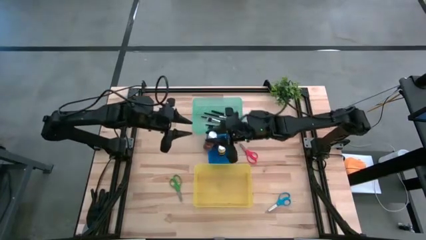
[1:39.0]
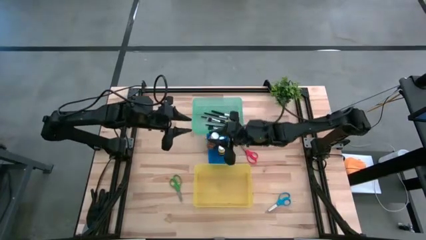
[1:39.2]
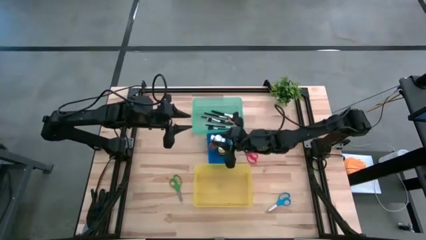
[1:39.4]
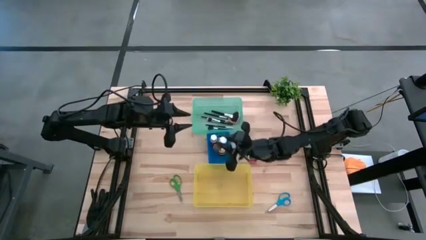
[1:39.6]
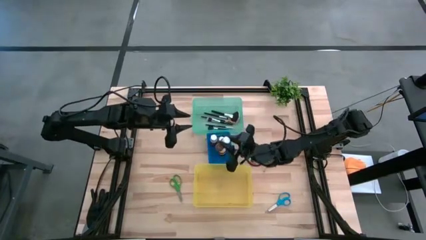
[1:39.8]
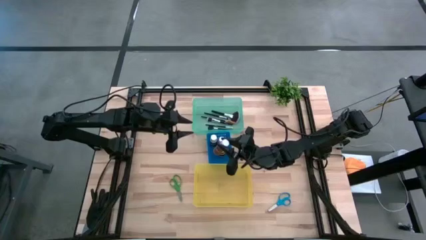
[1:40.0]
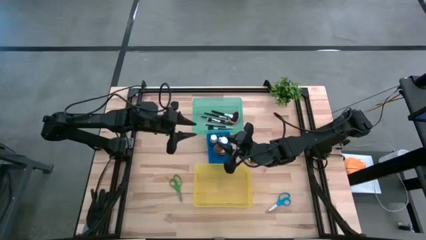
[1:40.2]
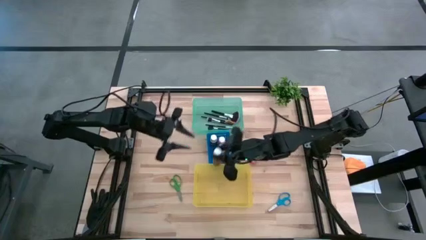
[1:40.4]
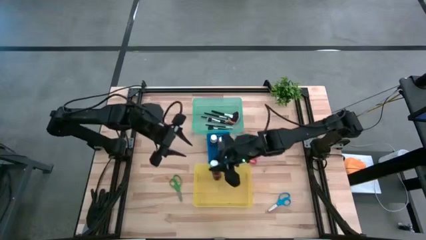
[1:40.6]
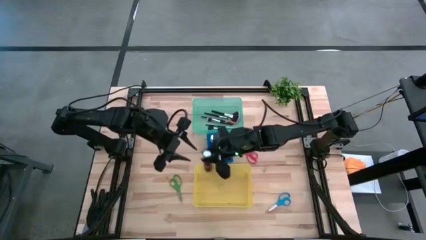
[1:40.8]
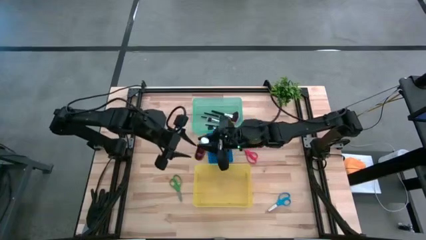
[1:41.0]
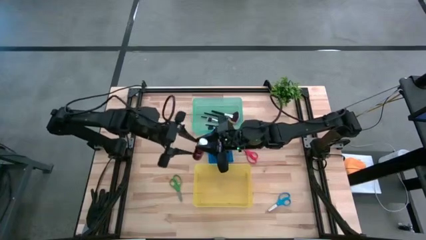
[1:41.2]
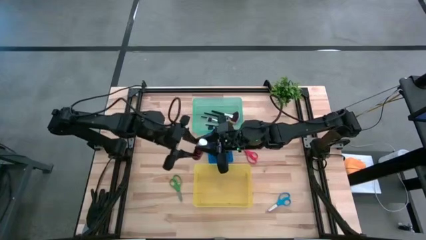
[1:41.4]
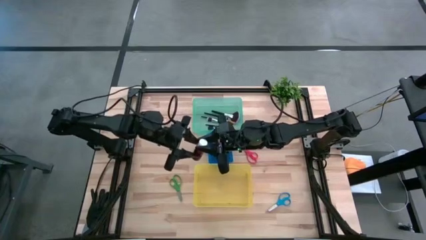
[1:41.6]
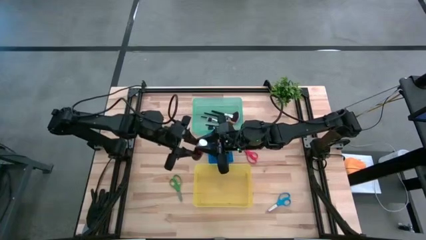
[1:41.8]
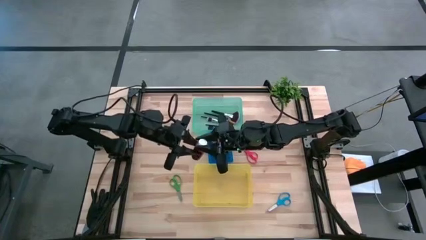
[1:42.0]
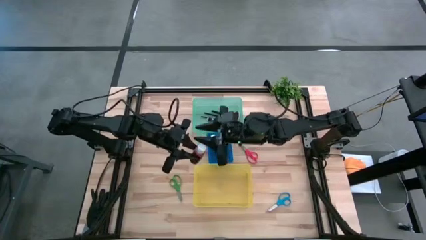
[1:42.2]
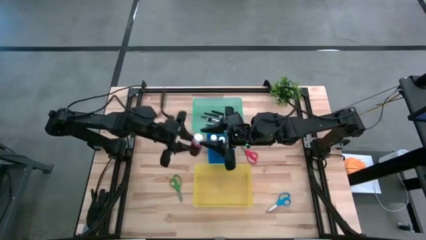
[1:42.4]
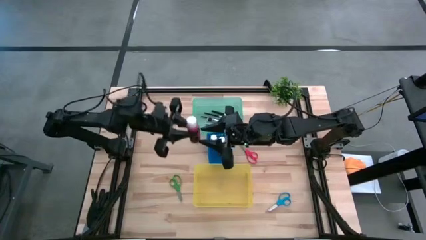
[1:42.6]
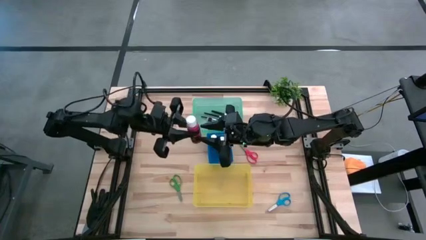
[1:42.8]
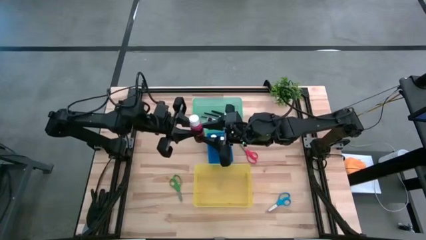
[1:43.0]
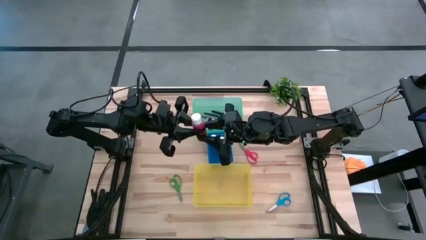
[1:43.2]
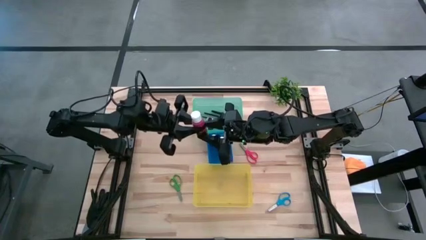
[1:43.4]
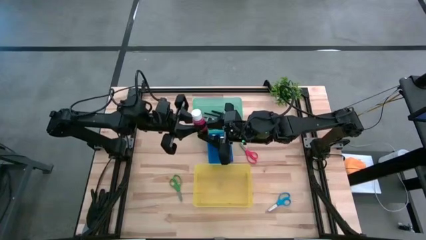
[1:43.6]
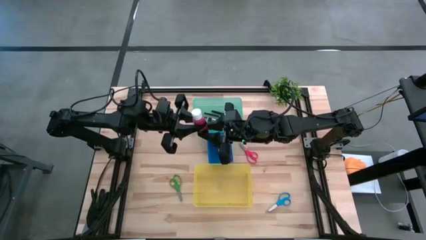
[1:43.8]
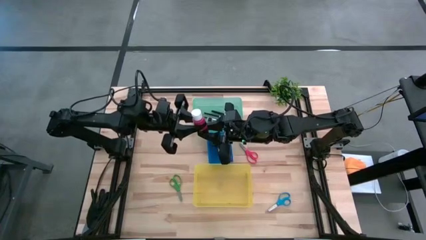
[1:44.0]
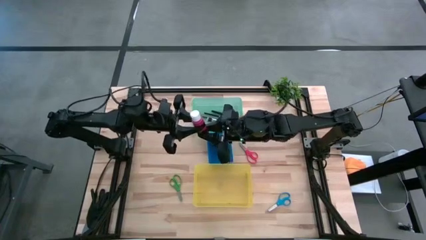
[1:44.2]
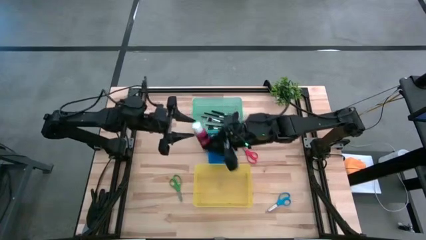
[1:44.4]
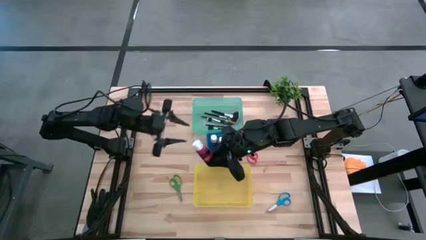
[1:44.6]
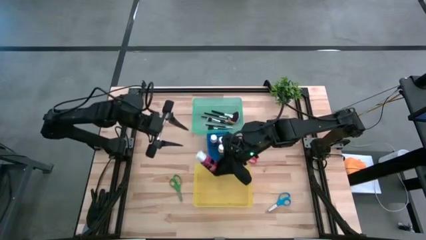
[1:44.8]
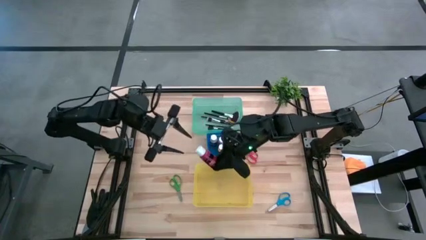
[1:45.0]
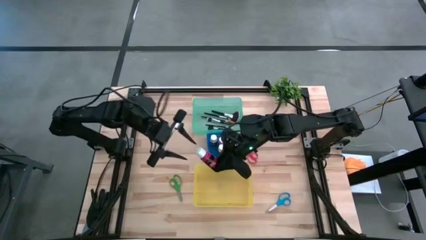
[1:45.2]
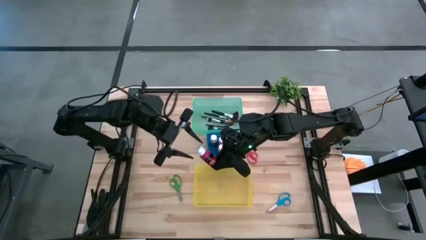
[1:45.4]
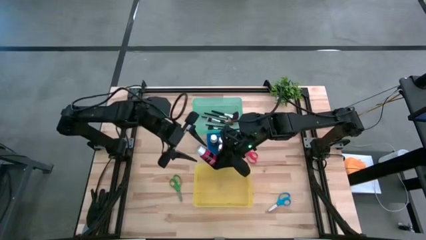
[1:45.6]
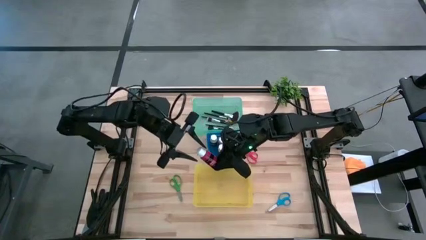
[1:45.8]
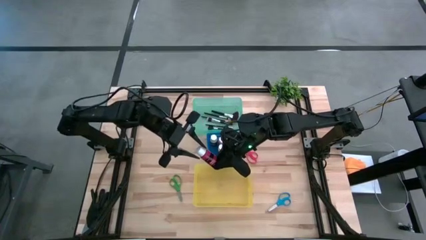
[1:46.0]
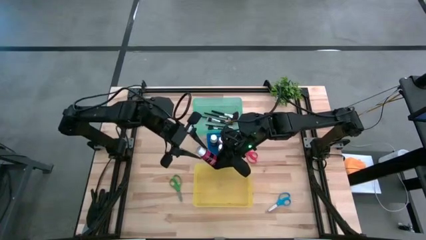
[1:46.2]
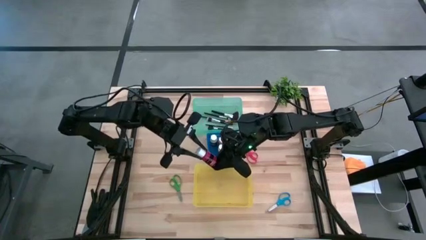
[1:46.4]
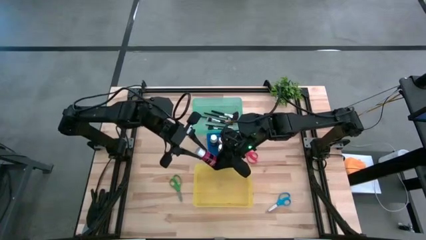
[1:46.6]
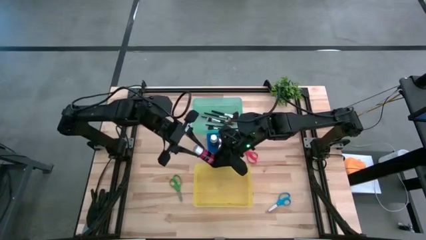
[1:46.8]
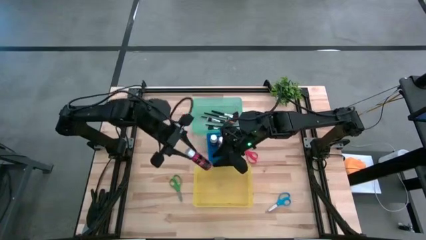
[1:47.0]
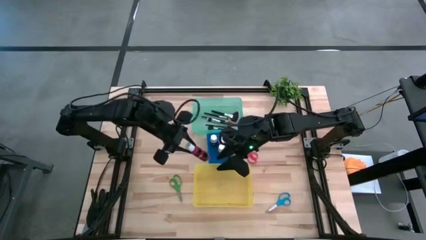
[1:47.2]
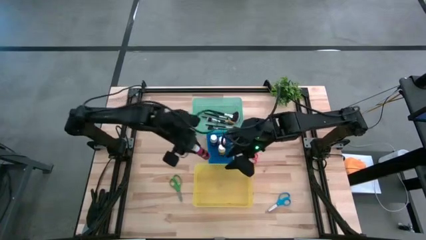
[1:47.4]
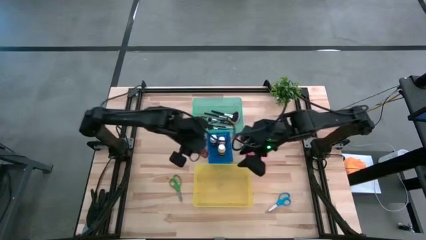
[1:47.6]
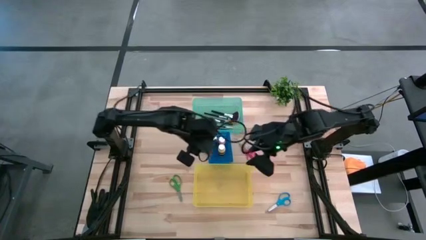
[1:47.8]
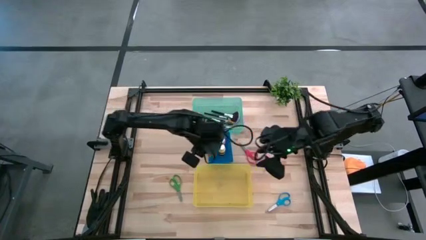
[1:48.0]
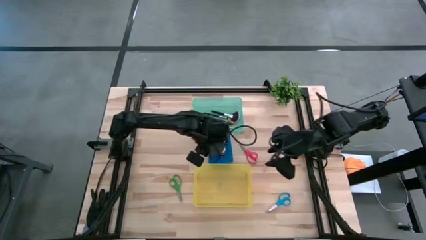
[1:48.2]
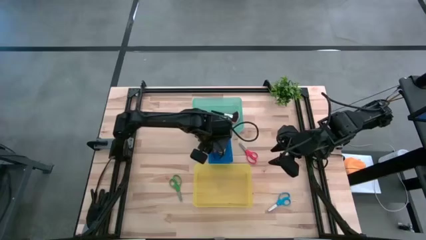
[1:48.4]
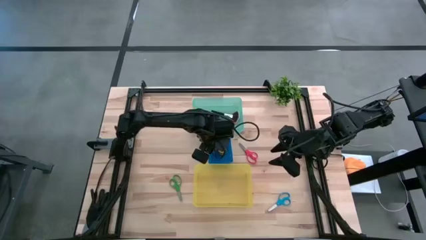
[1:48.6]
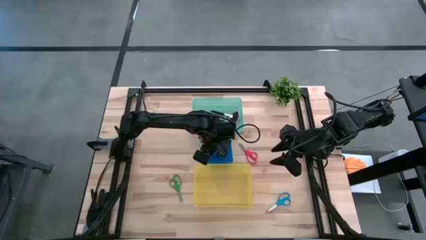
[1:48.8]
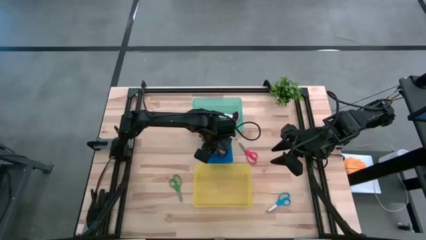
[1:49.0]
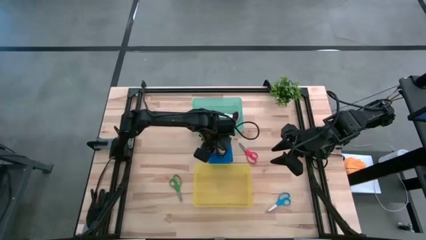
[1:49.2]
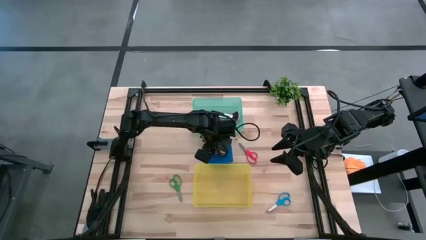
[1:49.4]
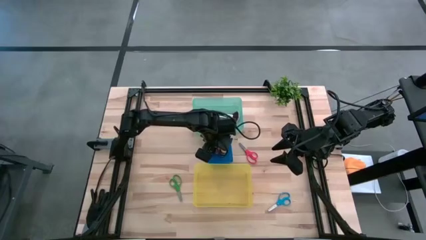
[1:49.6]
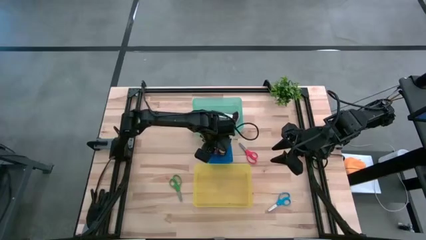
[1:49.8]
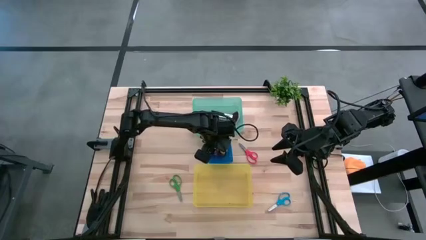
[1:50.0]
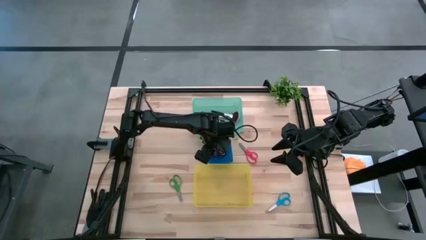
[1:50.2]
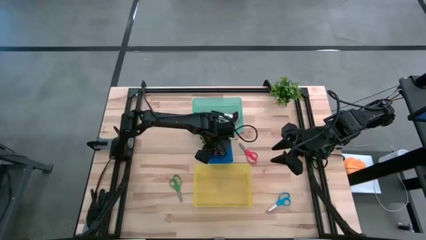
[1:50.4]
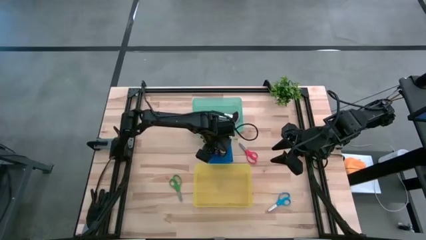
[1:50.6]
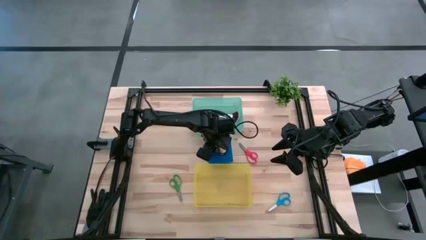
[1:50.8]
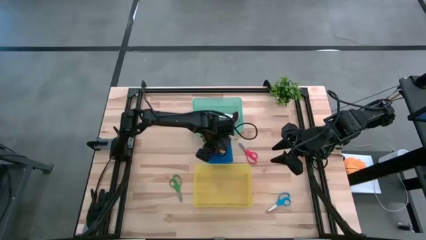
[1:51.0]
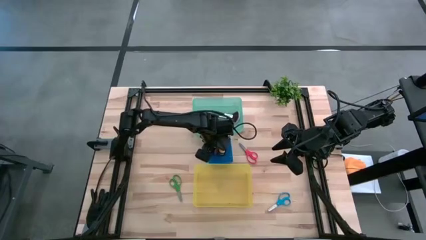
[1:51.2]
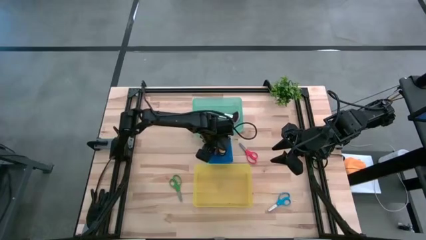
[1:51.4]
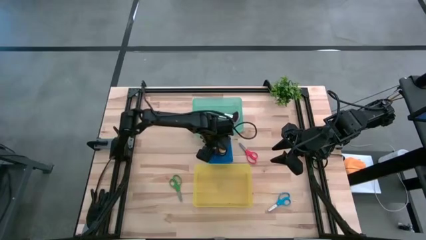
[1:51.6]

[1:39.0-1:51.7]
Task: Pick & Place Paint Supplies
Put the red paint bottle into the blue bin

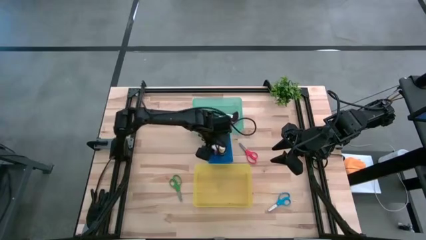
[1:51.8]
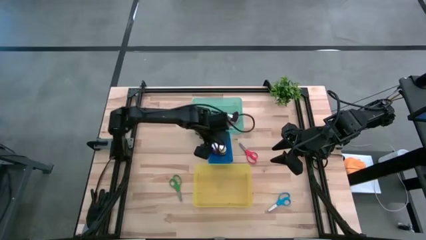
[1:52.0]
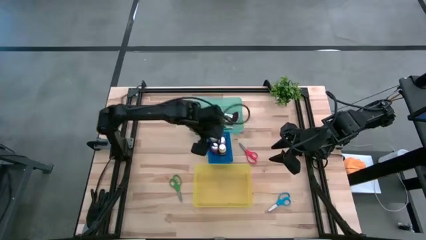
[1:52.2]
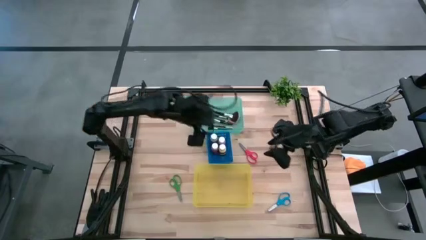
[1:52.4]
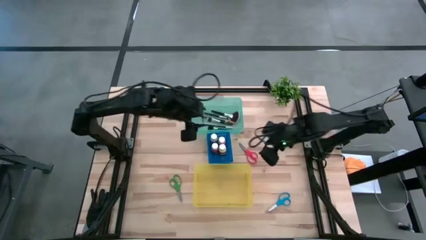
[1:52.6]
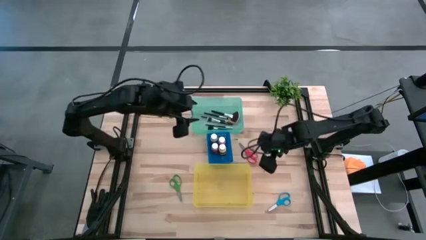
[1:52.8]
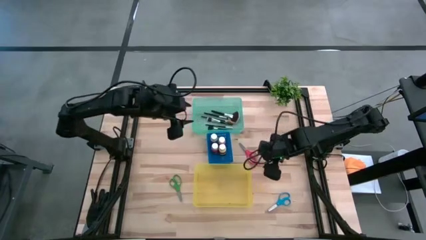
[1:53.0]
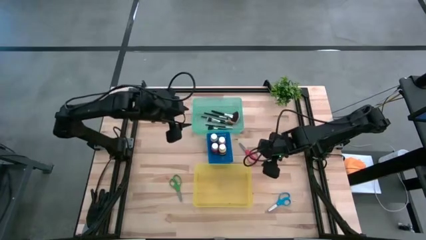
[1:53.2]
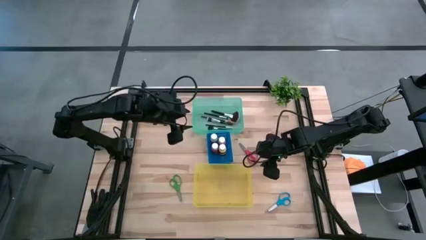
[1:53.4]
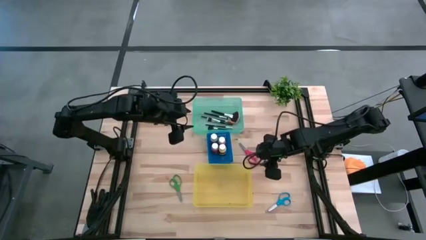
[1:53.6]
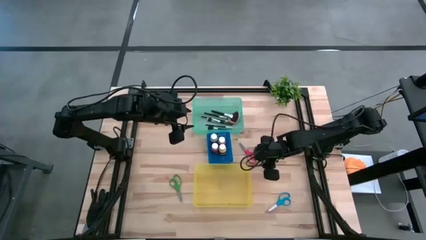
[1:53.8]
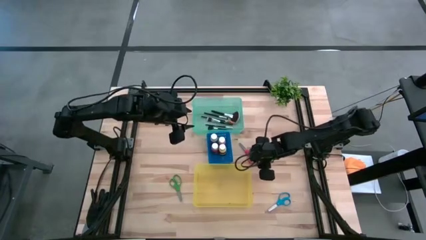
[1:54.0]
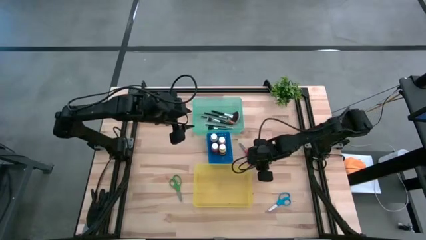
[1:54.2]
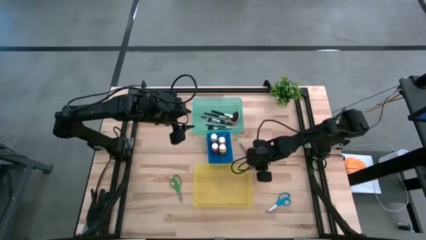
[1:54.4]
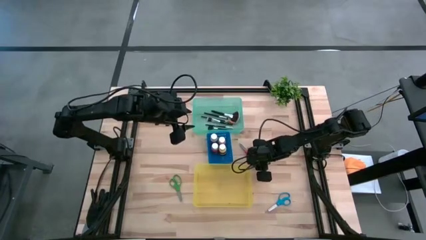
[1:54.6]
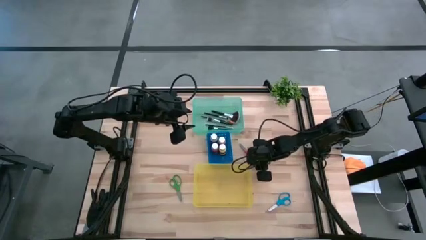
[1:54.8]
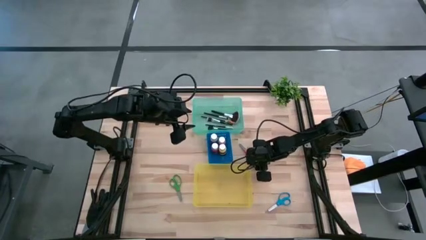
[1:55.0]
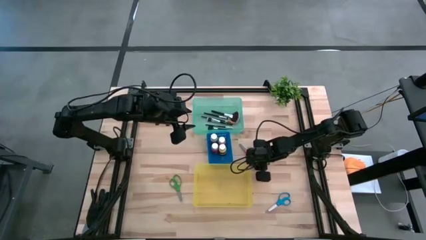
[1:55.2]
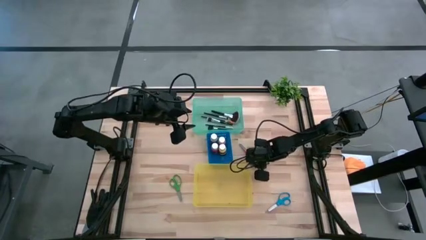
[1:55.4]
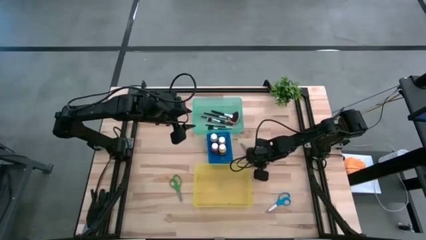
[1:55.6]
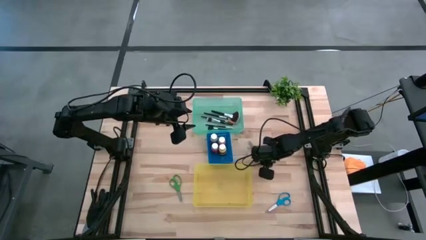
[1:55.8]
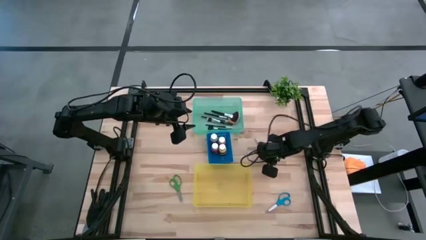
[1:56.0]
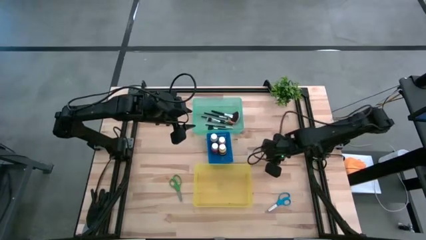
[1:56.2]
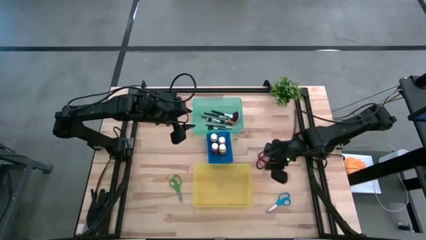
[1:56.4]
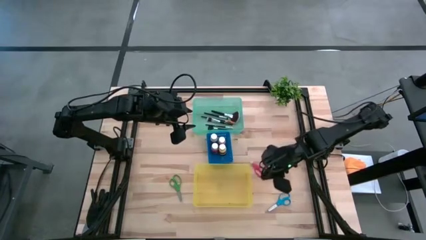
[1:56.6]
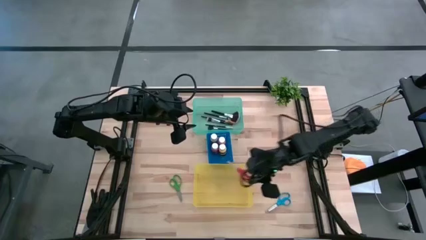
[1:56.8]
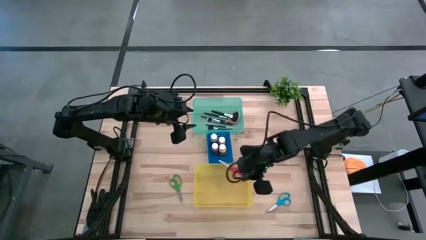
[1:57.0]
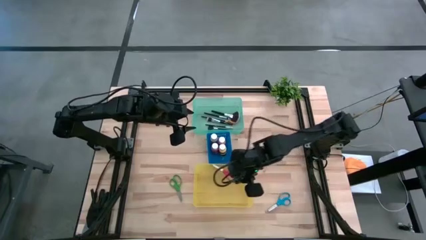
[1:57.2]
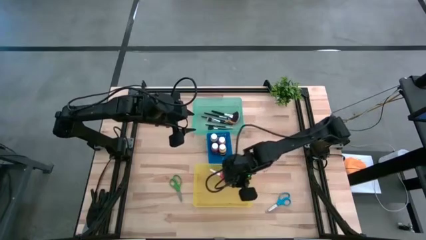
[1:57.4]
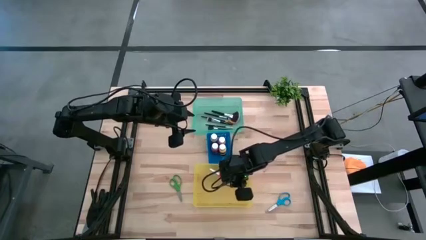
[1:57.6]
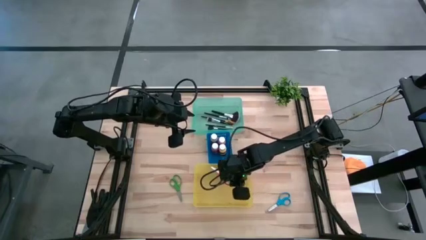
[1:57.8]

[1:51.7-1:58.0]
Put the red scissors into the yellow bin
